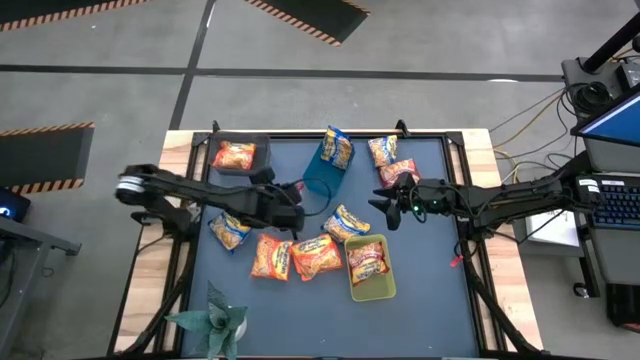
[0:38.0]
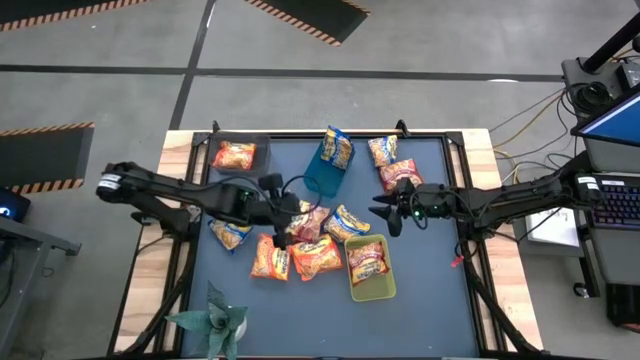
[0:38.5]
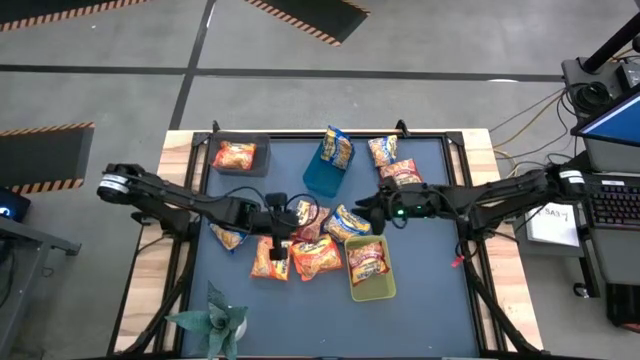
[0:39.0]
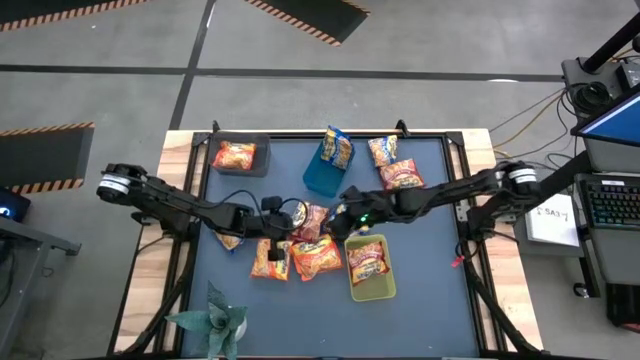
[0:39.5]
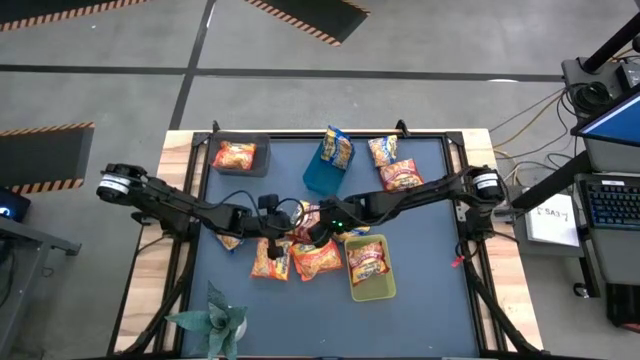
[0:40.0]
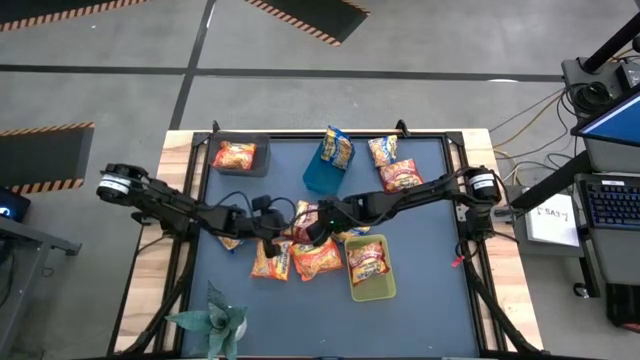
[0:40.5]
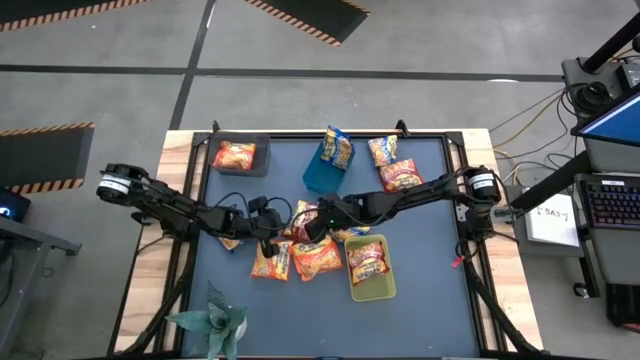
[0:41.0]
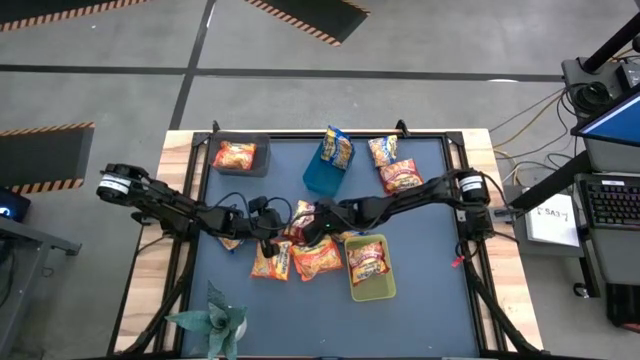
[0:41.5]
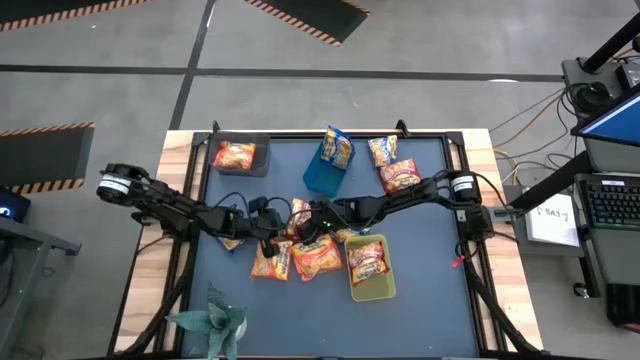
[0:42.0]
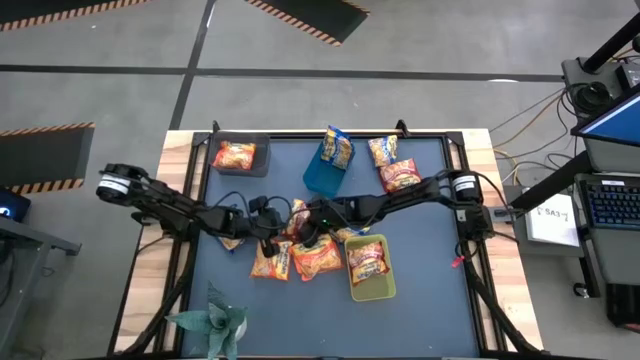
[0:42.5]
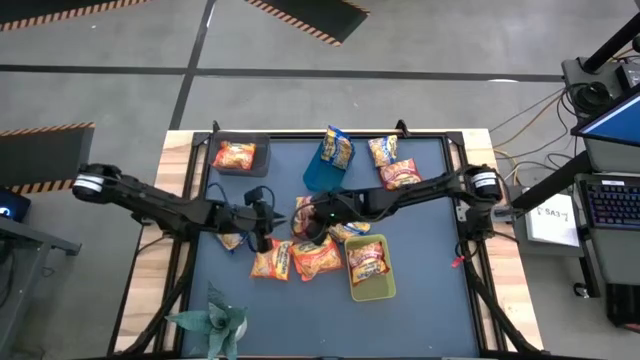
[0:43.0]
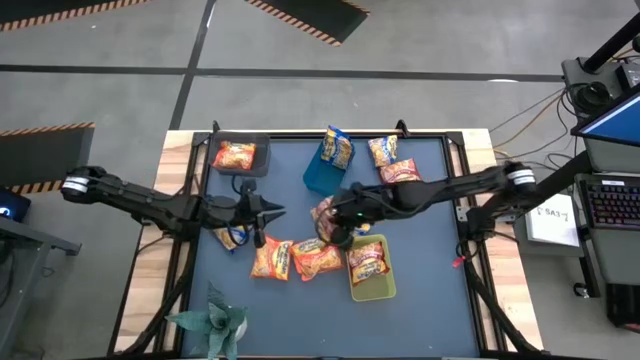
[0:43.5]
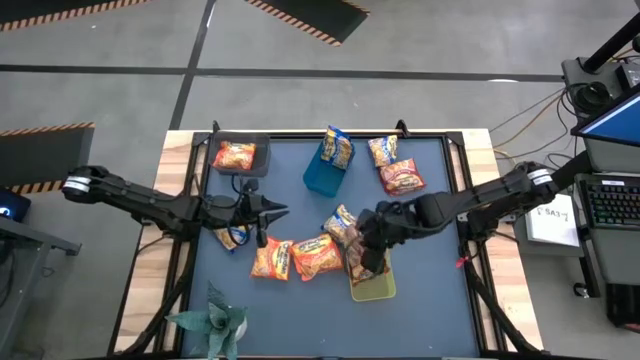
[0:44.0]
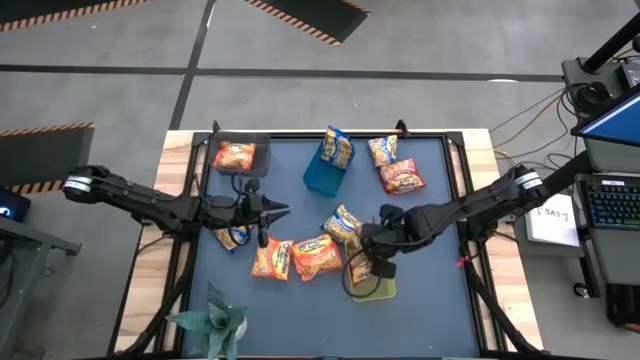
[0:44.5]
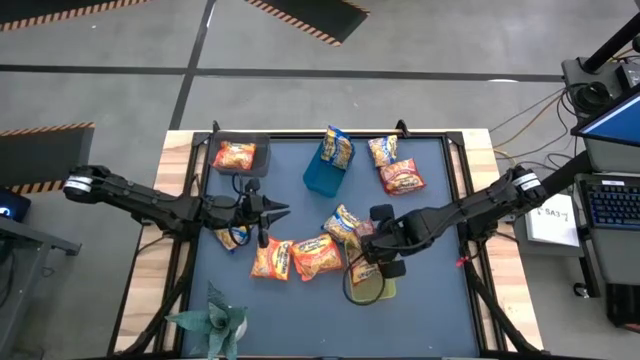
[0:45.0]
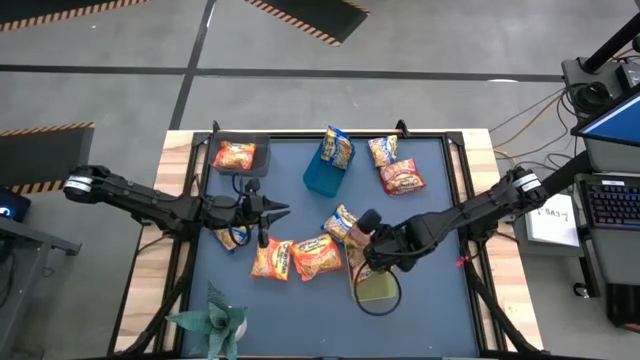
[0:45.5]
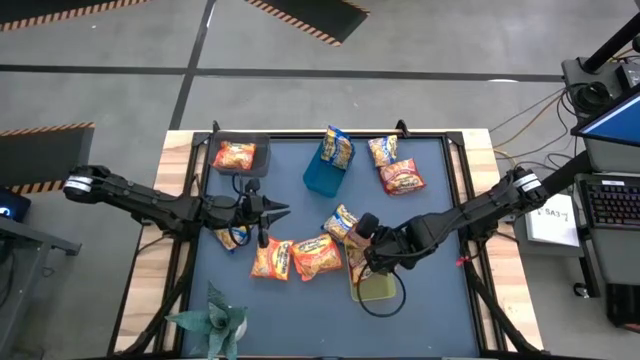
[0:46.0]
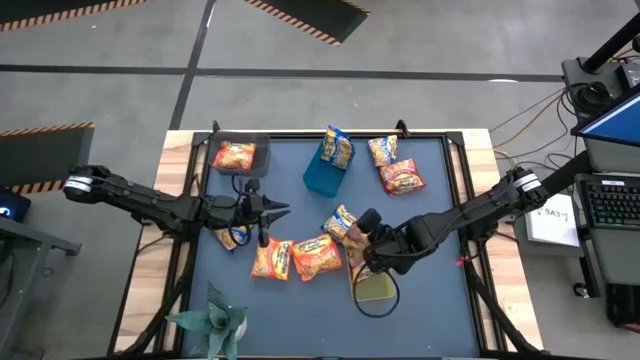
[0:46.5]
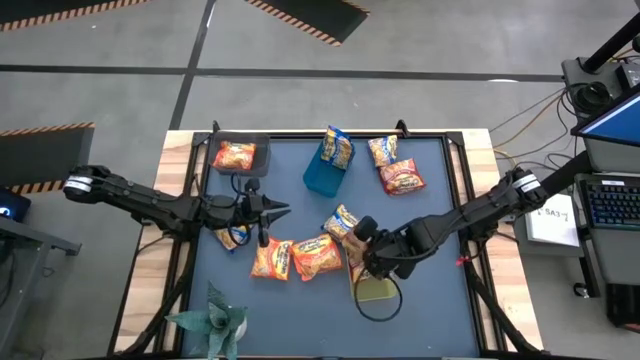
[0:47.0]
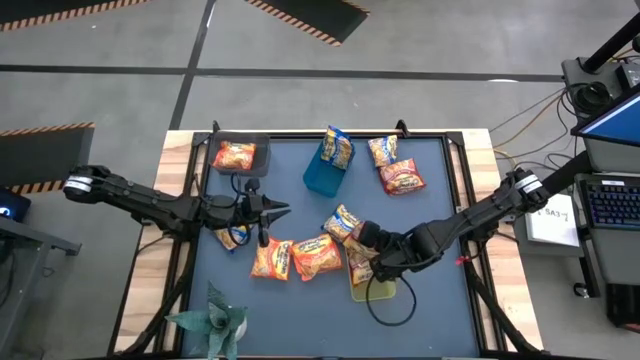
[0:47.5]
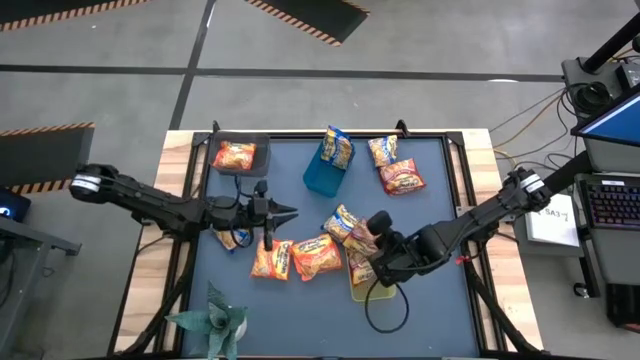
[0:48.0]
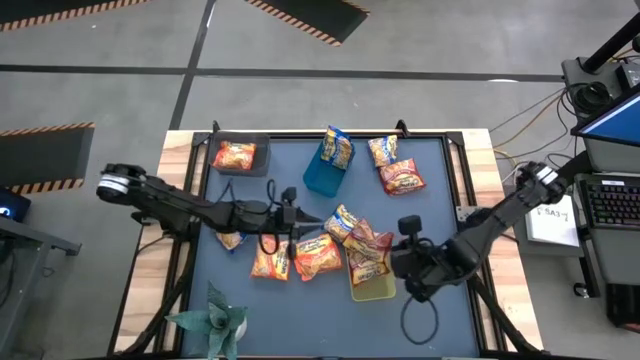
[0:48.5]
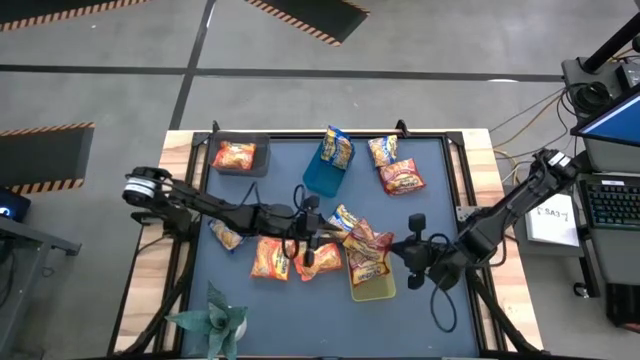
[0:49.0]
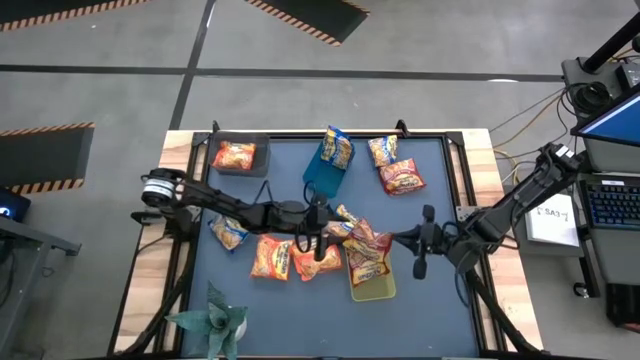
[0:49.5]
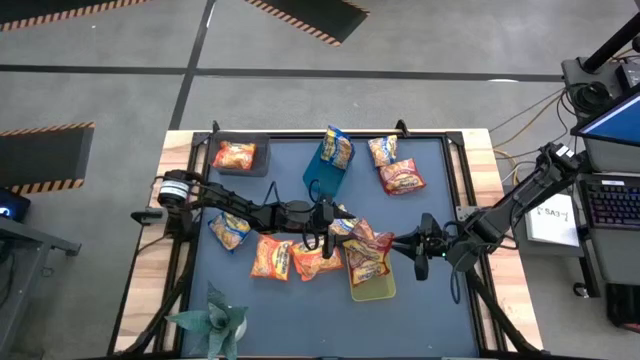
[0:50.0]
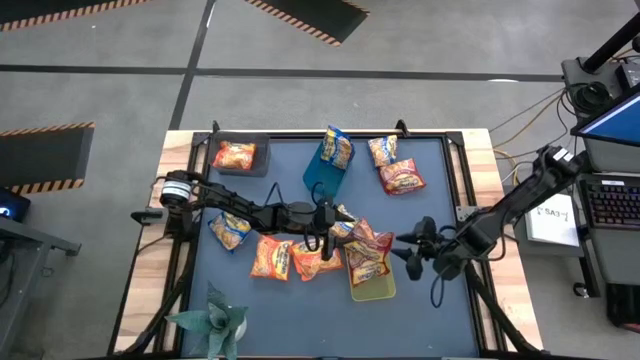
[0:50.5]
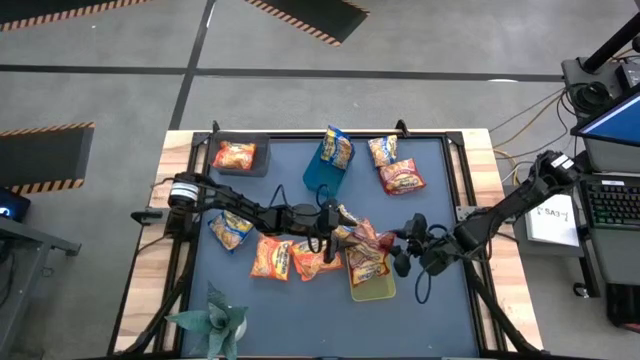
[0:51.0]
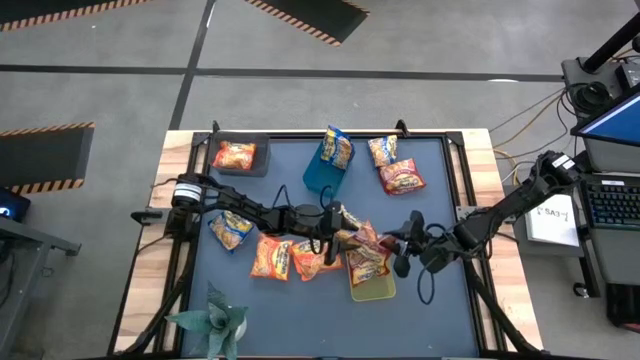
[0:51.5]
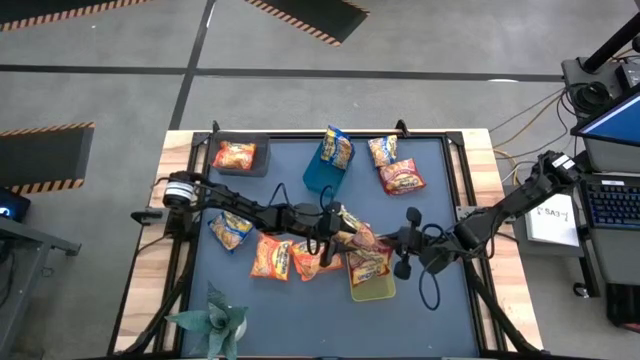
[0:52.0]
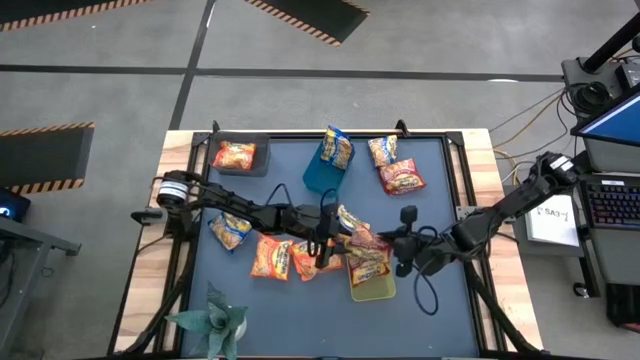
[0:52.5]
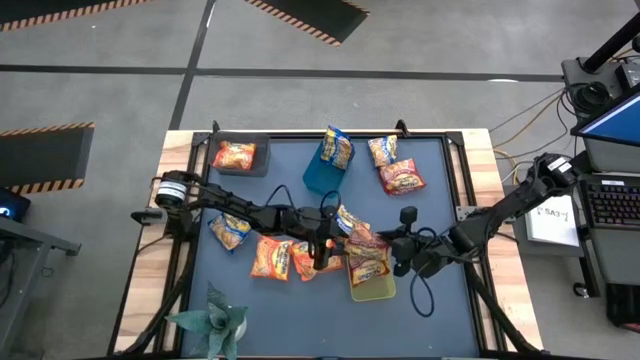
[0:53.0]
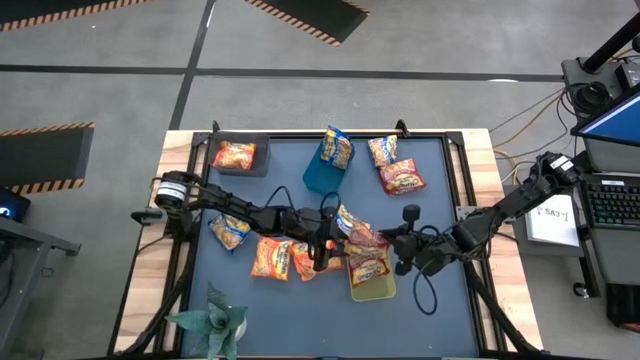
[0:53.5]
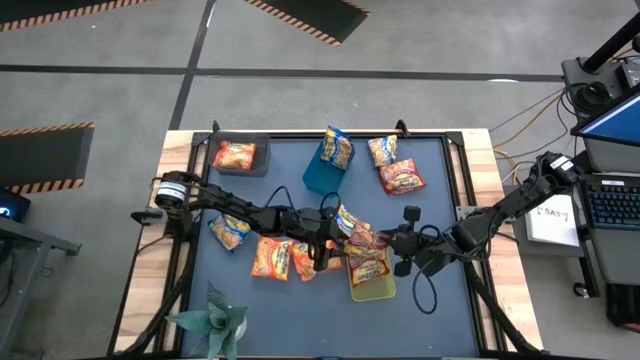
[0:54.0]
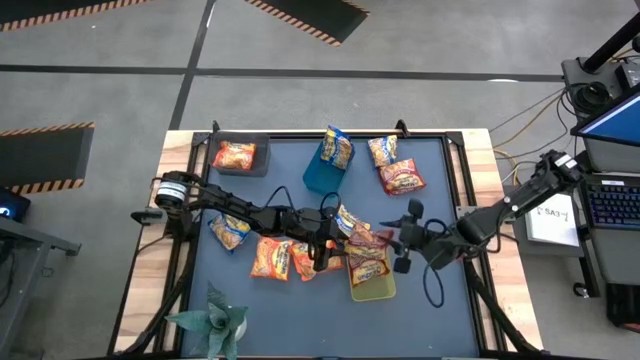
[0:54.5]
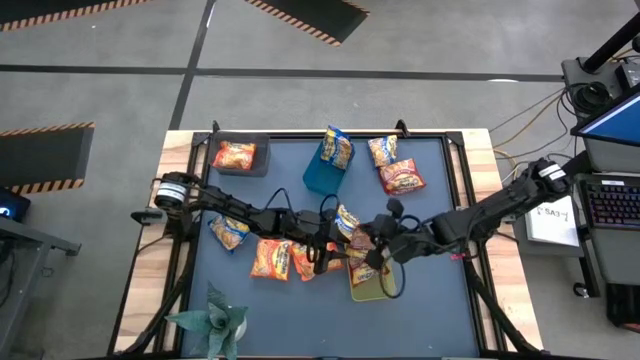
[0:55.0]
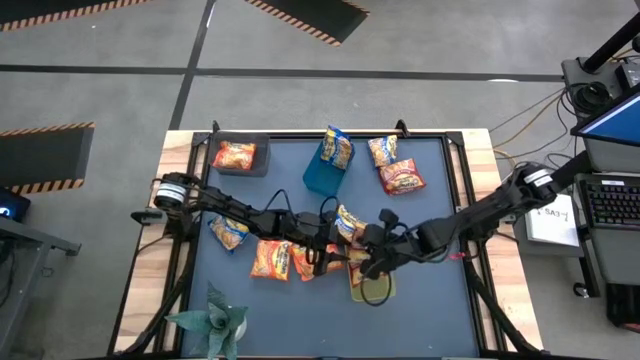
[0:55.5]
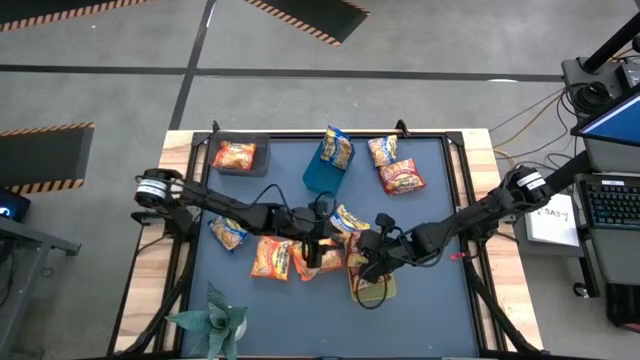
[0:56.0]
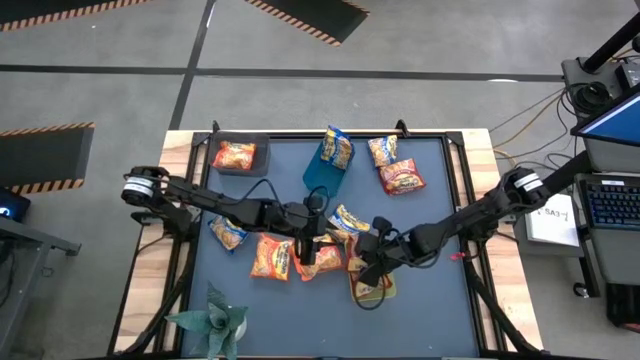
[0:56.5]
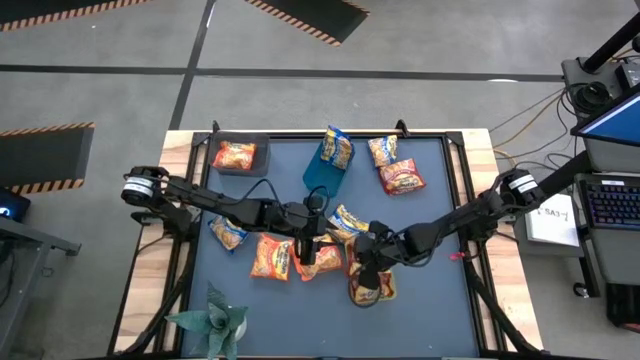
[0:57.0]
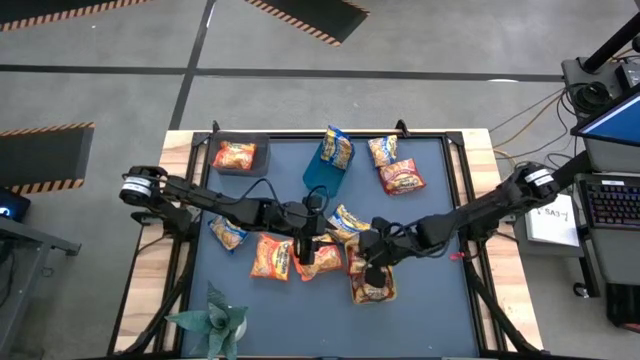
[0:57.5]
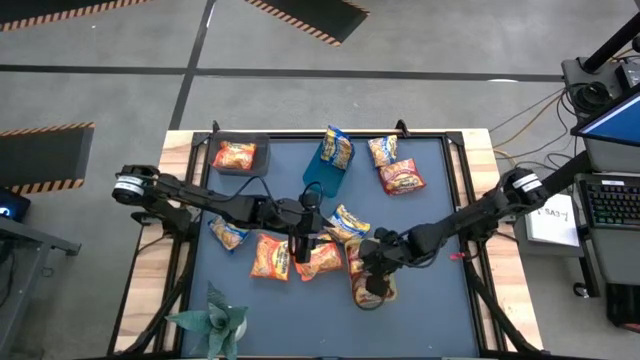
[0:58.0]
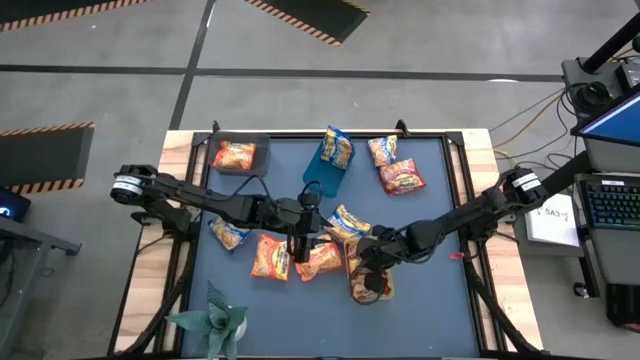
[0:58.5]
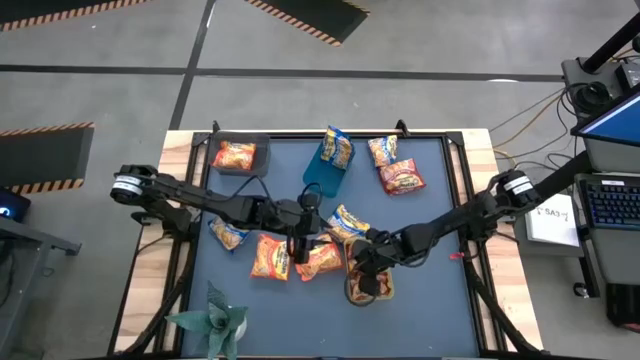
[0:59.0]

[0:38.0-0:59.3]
Task: Sort Maruchan noodles
Put the red noodle pack into the yellow bin
